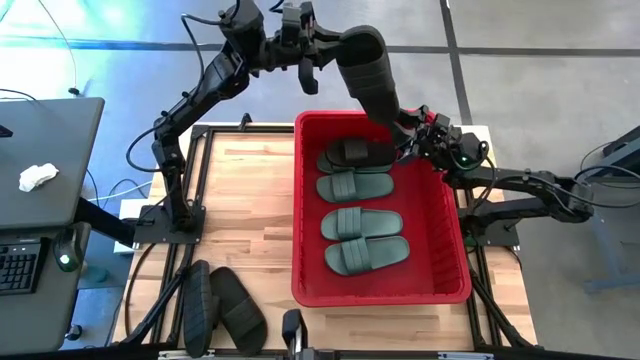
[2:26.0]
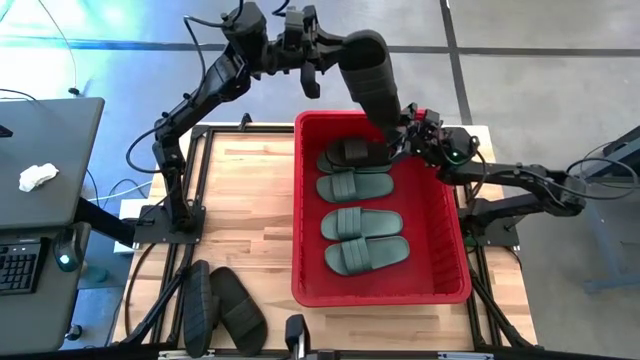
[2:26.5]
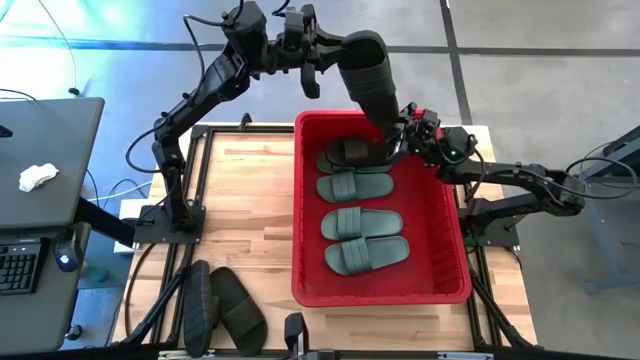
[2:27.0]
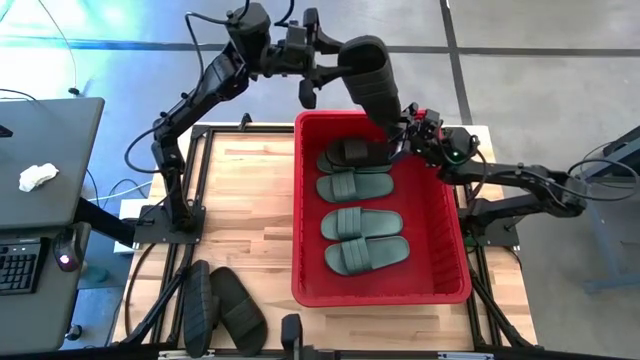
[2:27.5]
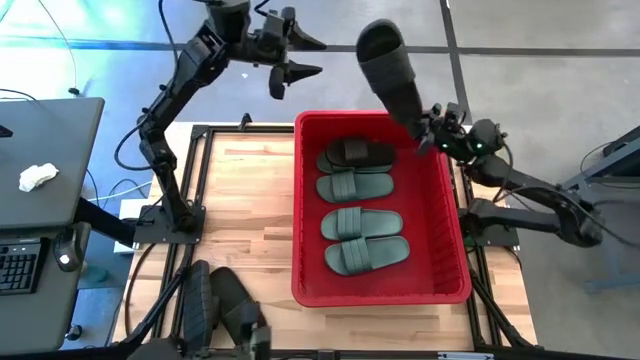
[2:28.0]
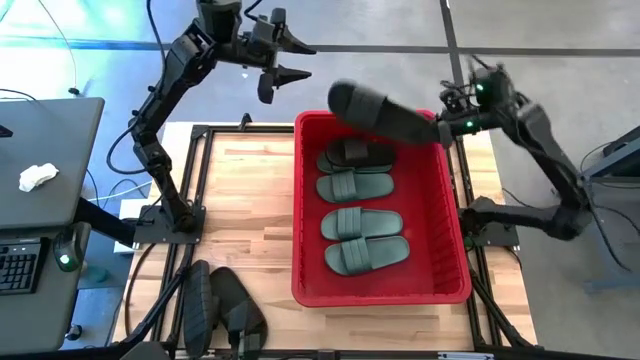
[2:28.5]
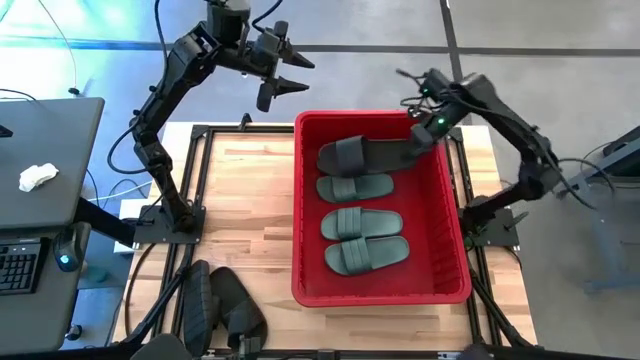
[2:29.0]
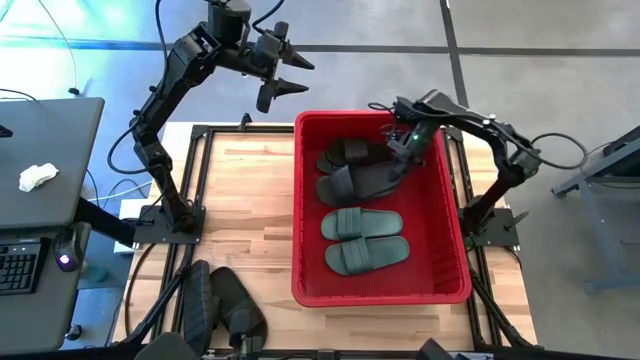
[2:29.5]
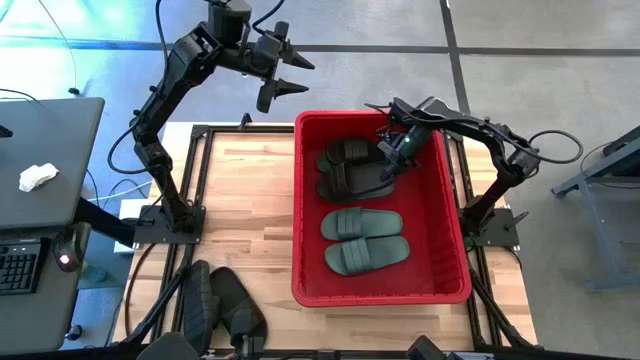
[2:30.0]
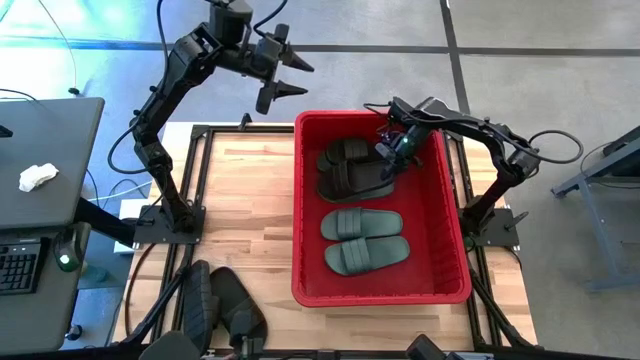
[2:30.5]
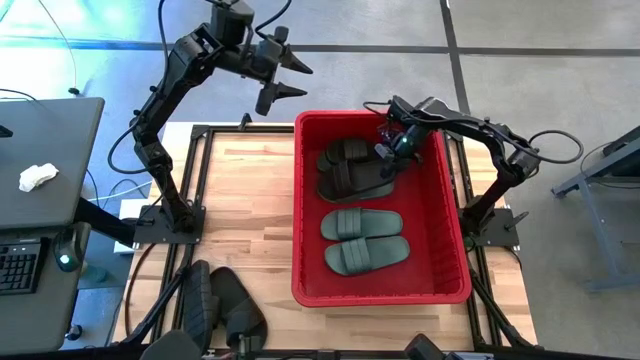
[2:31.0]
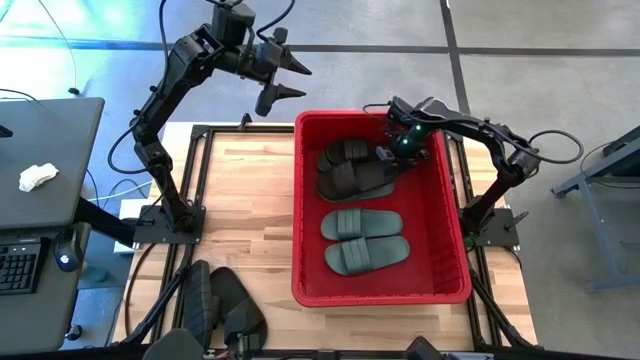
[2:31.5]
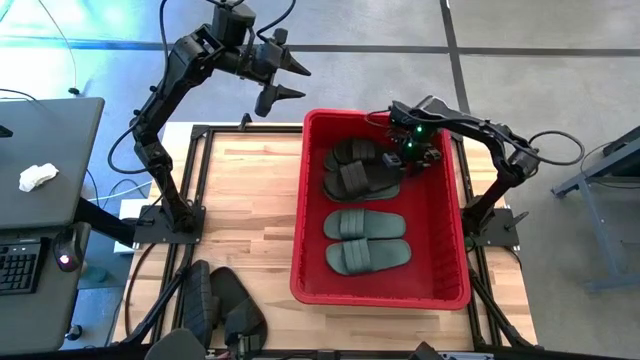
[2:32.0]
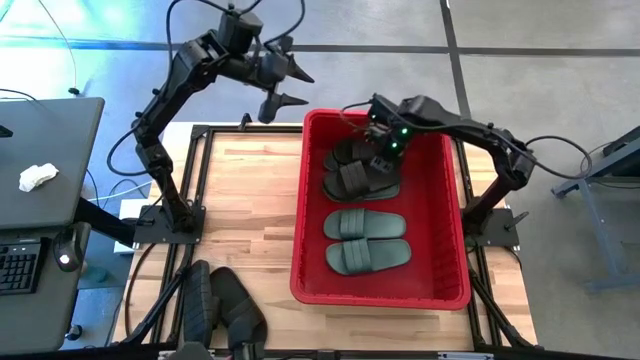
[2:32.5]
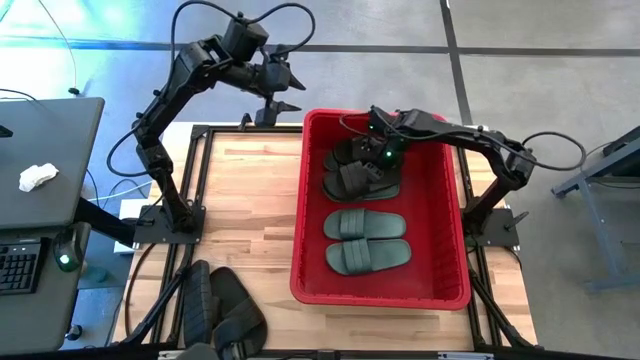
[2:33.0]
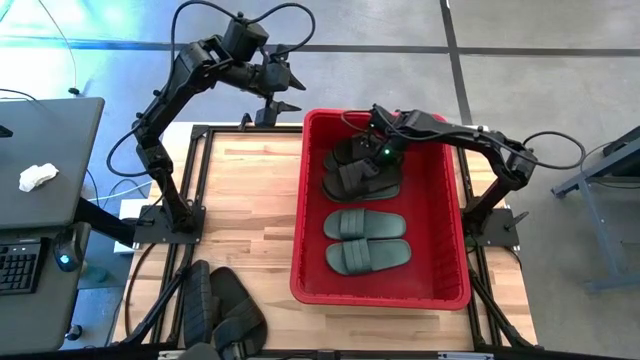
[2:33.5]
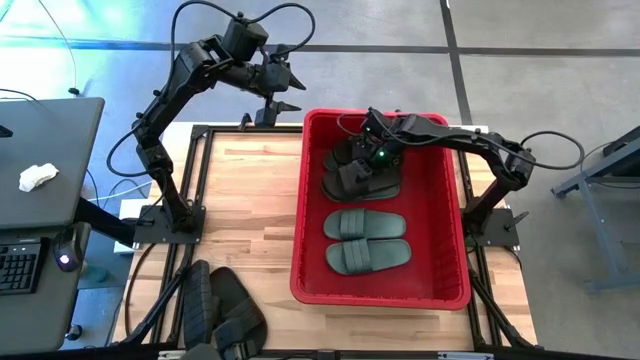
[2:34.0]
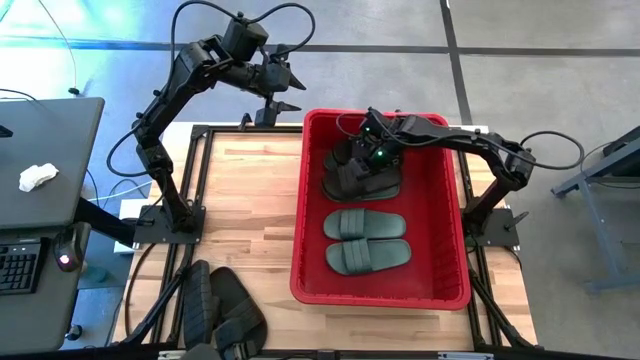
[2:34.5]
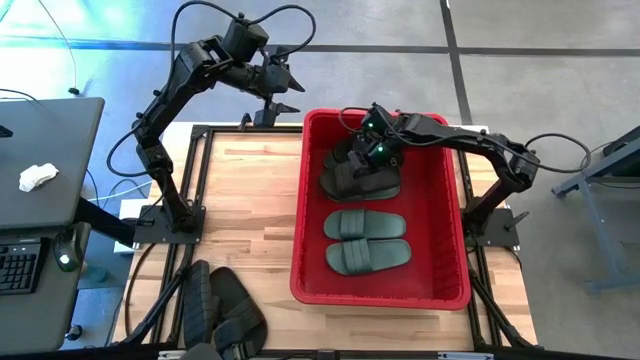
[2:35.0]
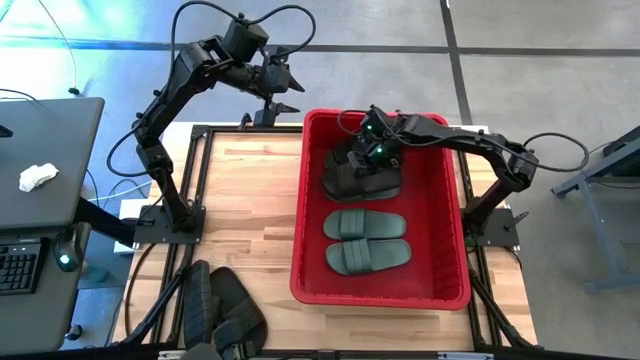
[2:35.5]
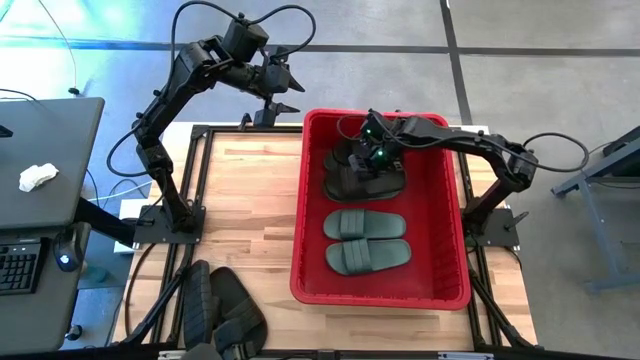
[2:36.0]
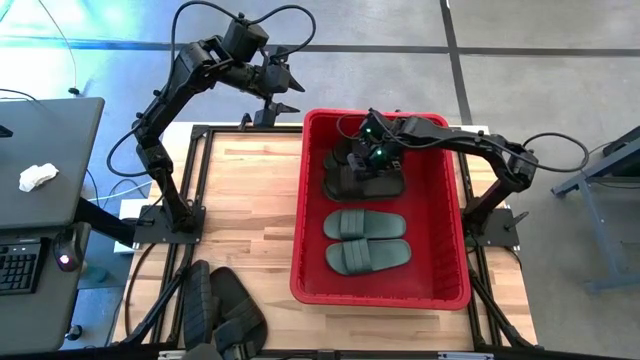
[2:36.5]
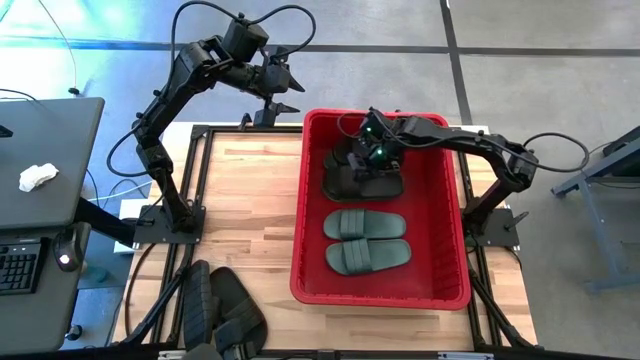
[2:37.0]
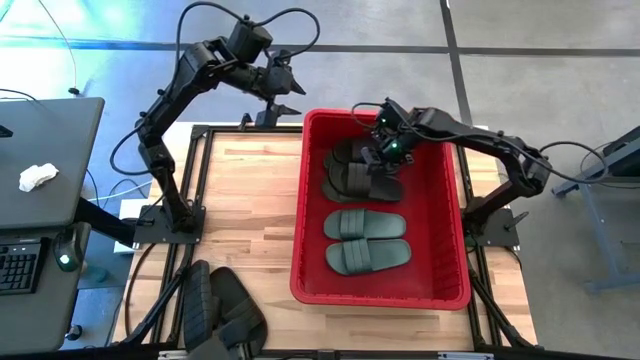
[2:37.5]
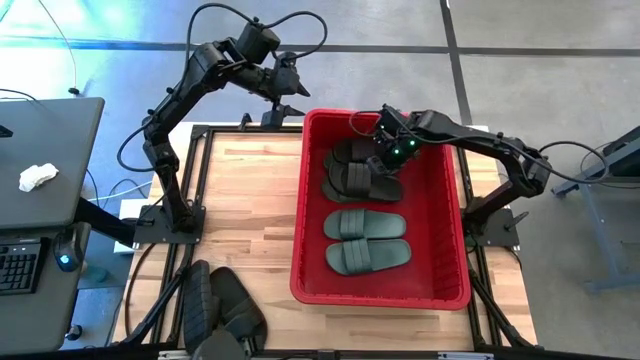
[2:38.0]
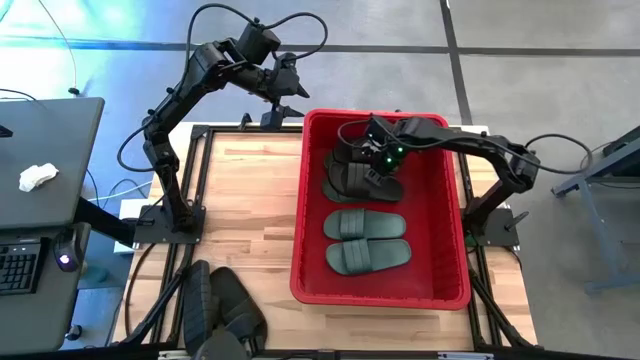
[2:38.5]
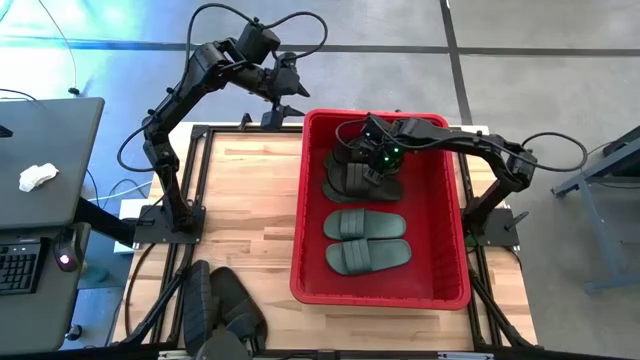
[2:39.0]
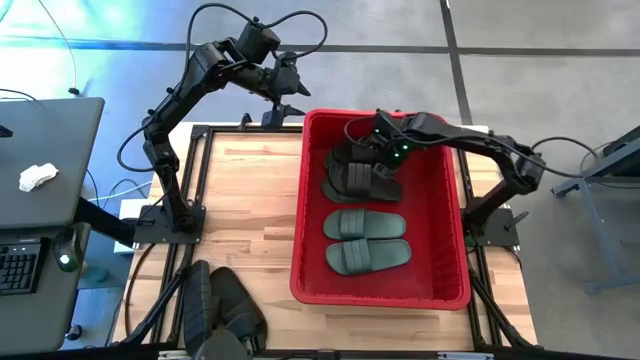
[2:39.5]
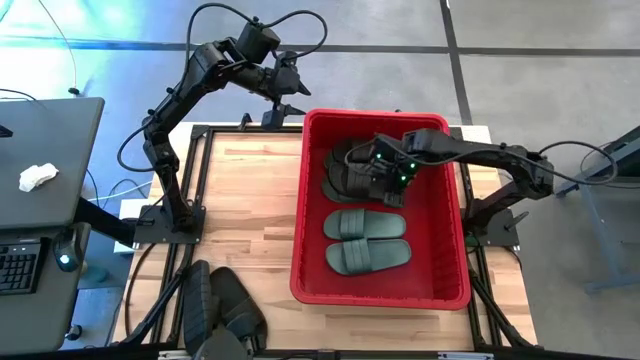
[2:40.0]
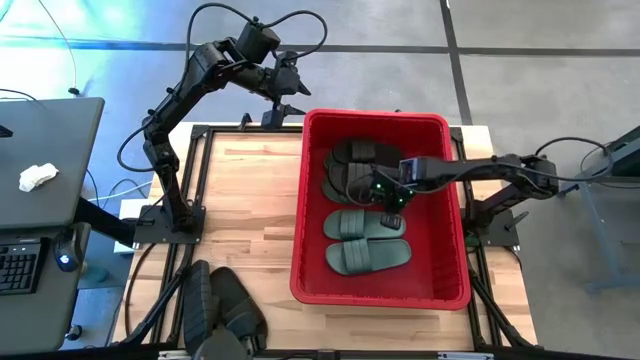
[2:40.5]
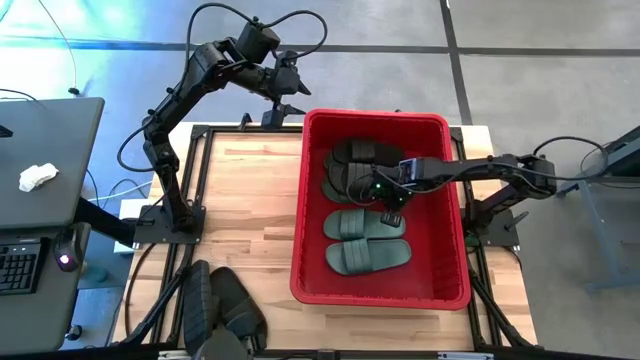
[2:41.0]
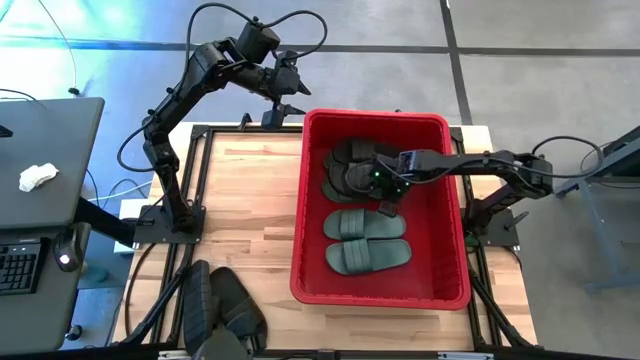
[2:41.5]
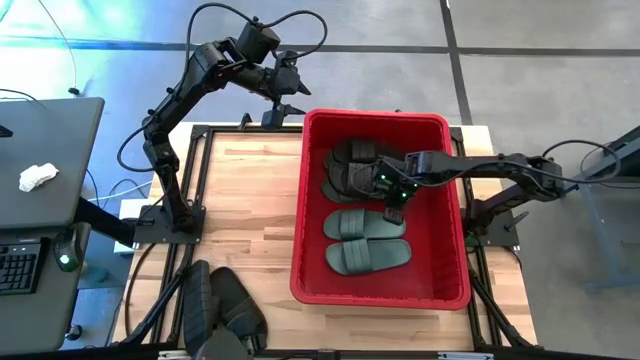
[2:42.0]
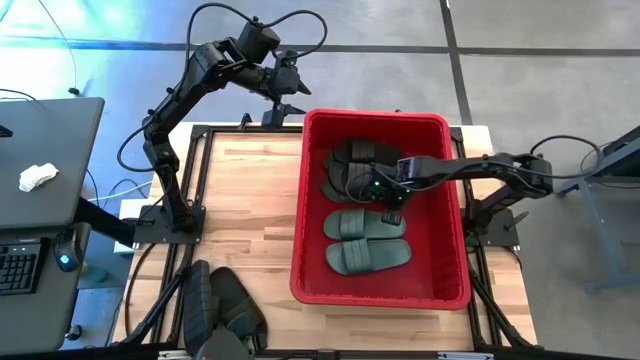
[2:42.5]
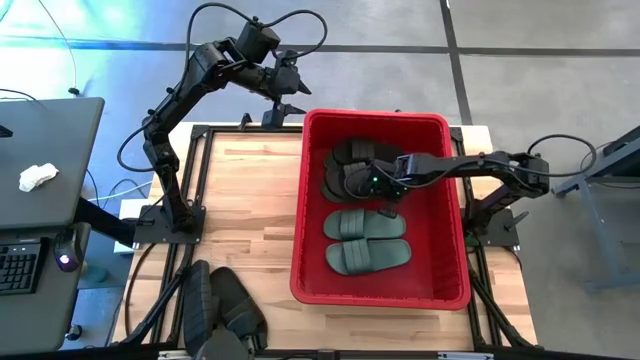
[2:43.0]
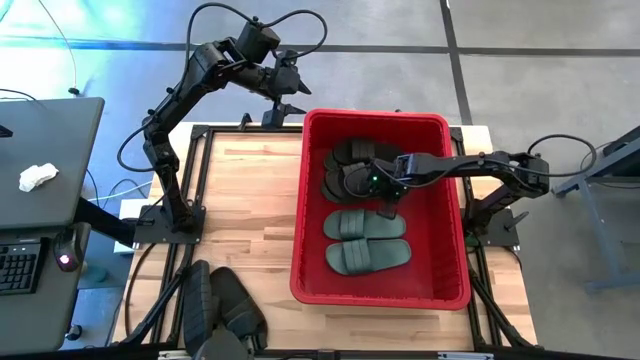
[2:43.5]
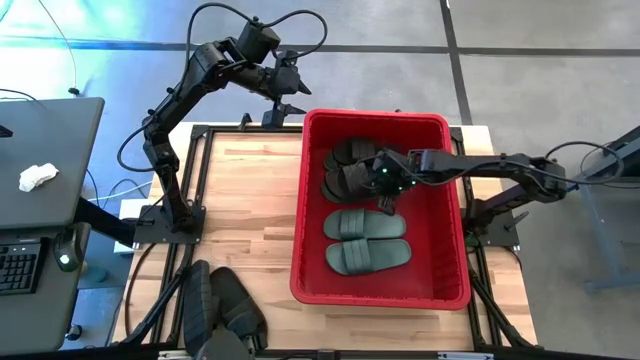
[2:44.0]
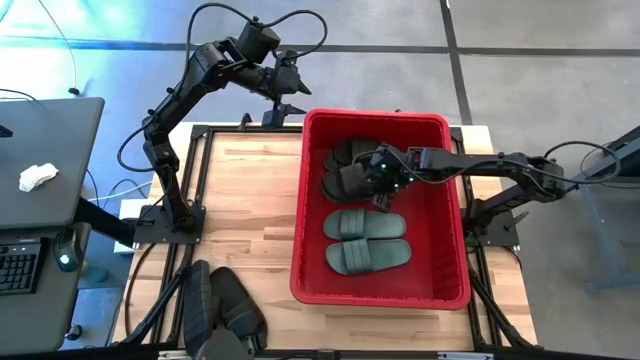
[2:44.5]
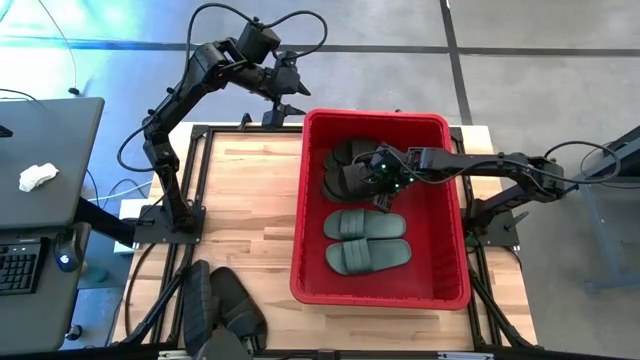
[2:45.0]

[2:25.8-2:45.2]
Task: Pick and place slides into bin
Put the black slide into the red container

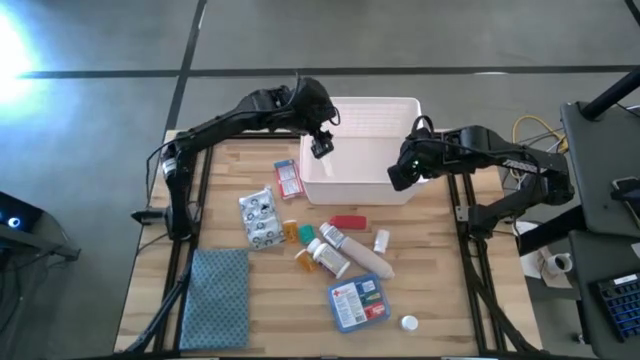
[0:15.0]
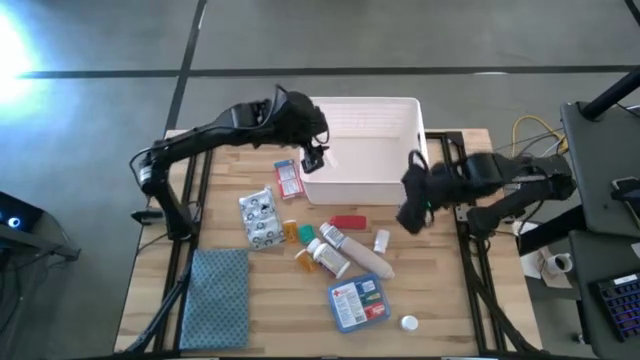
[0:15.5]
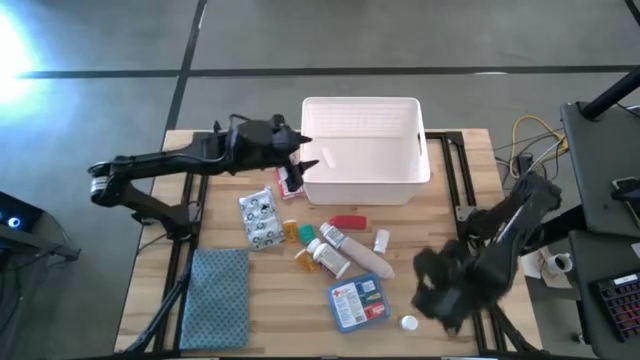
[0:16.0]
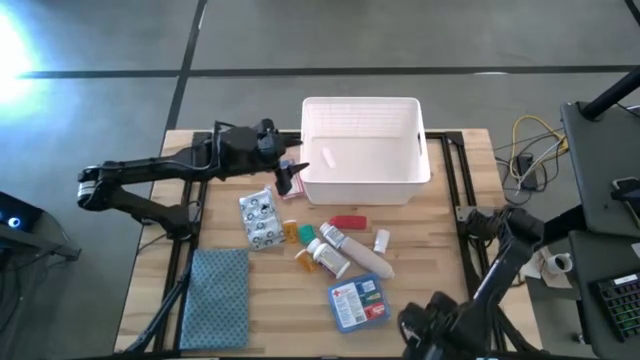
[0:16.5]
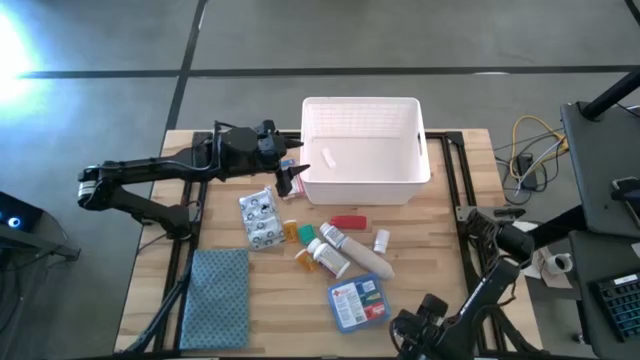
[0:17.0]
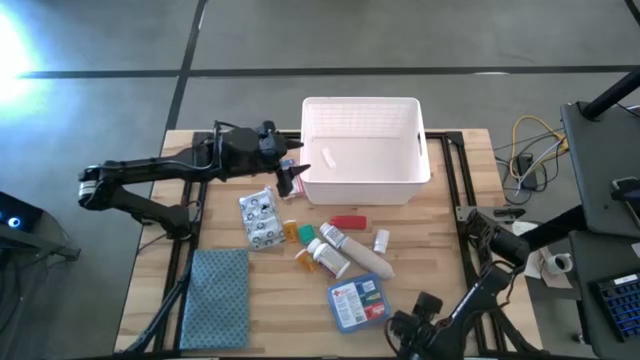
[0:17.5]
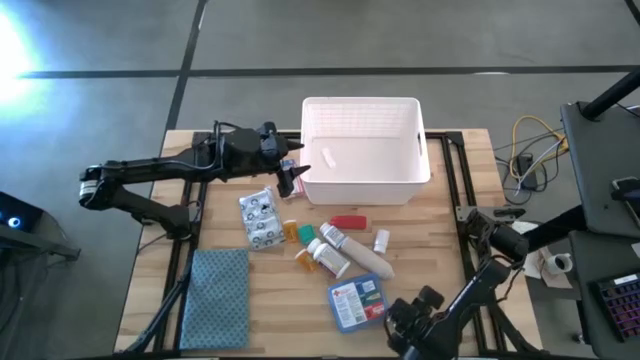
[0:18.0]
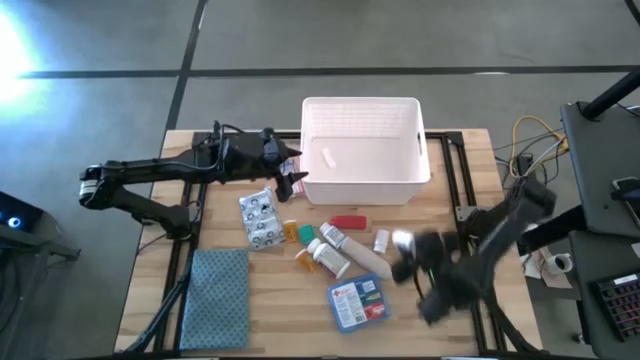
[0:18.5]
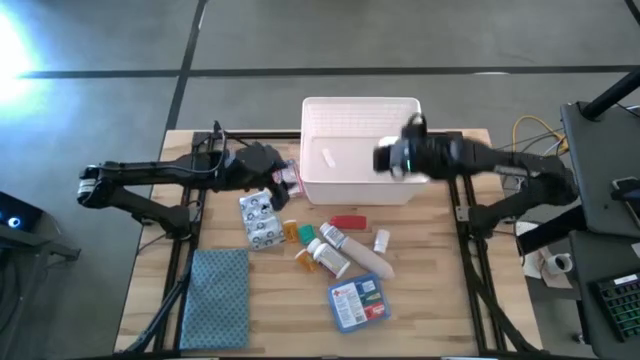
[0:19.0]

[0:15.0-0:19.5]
Task: Pick & place medical supplies in basket/bin
Put the white medicine bottle into the bin
